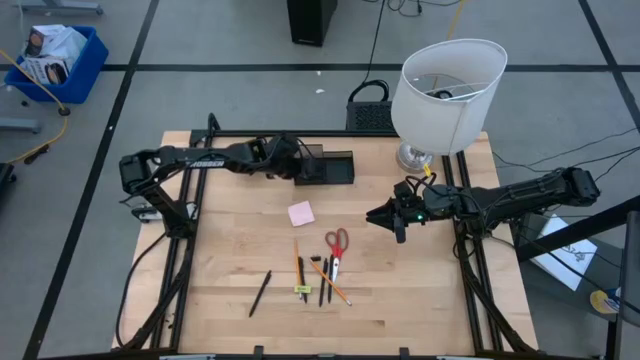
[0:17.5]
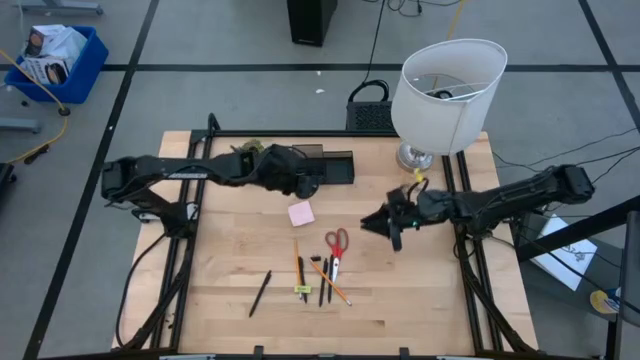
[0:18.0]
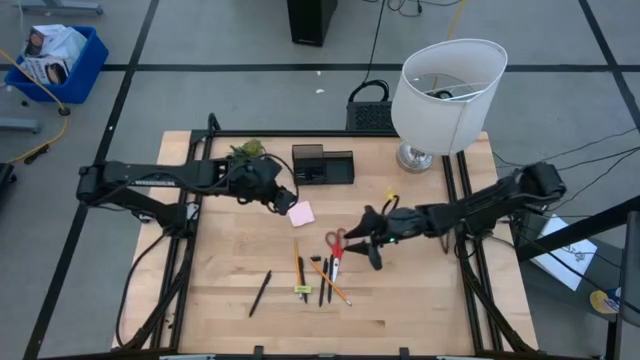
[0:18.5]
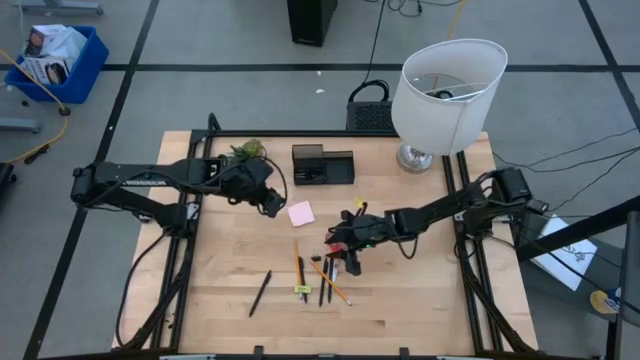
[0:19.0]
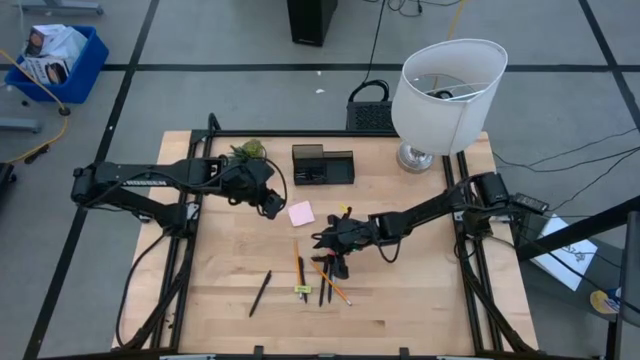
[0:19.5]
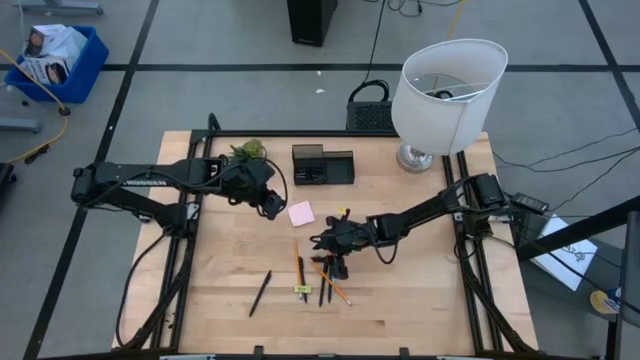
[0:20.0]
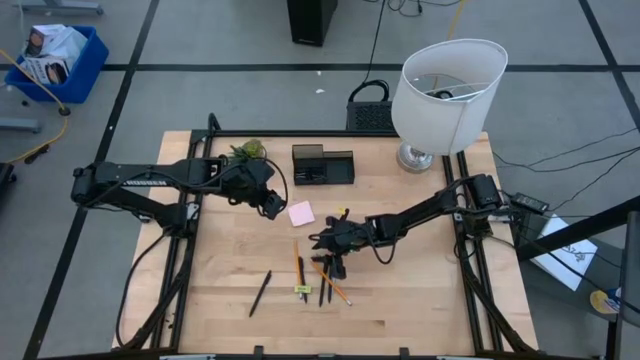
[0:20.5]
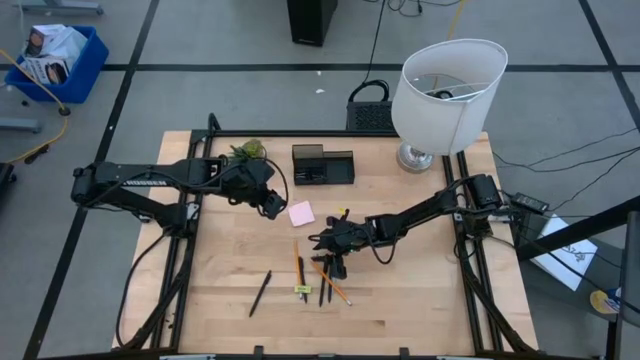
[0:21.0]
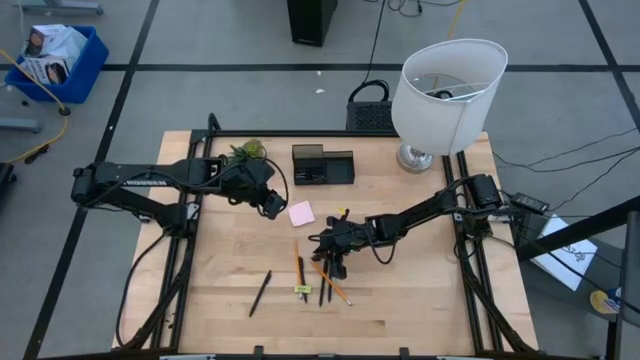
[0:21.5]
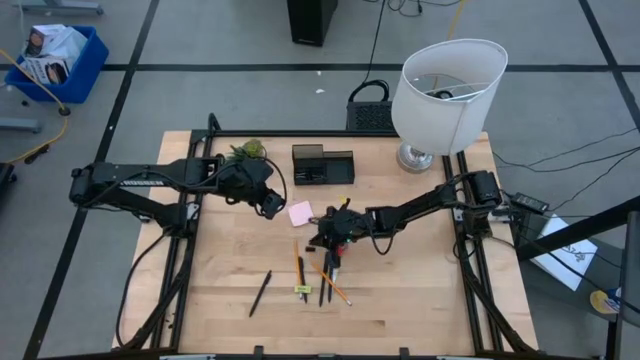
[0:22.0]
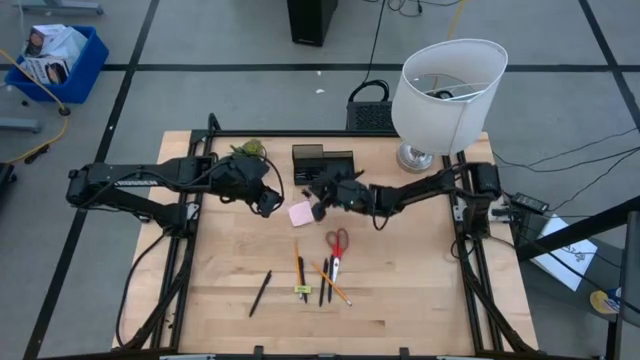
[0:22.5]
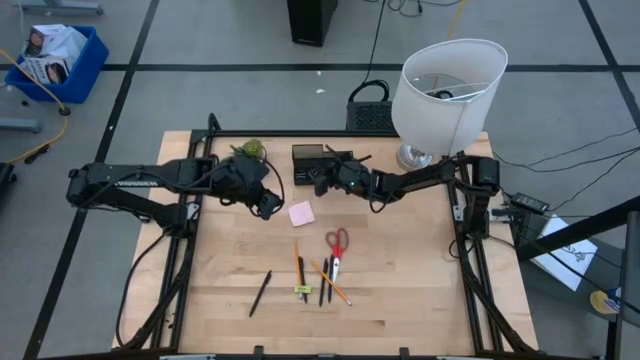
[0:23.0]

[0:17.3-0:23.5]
Task: Pick and place office supplies into organizer
Put the black binder clip into the black desk organizer

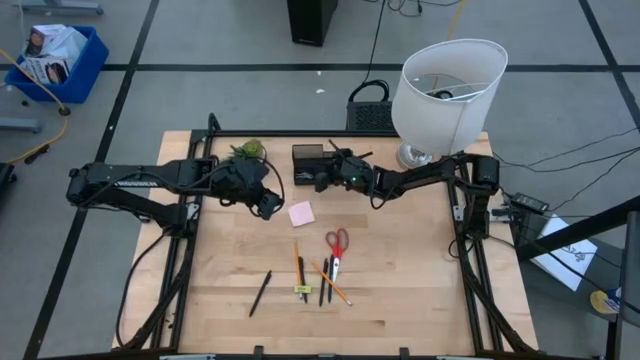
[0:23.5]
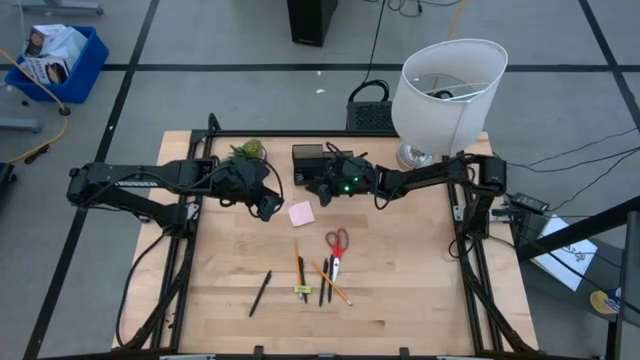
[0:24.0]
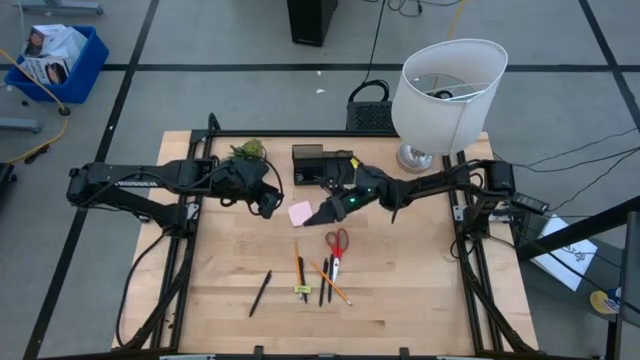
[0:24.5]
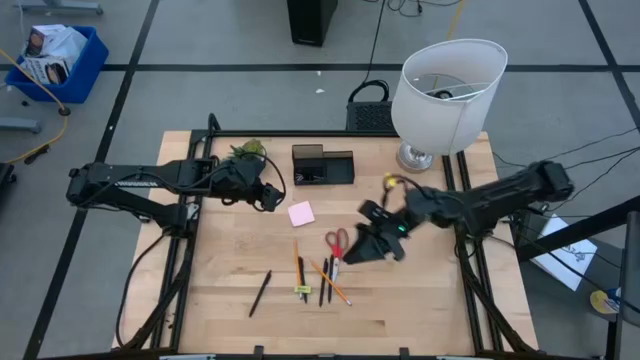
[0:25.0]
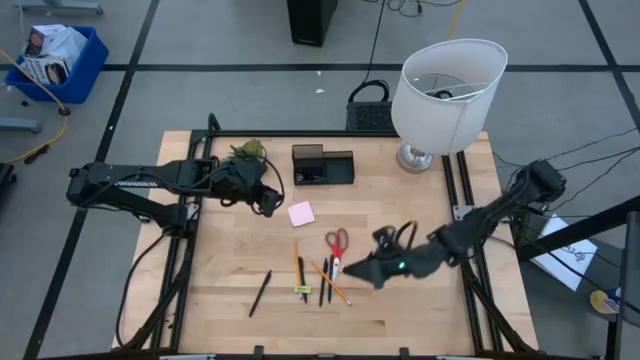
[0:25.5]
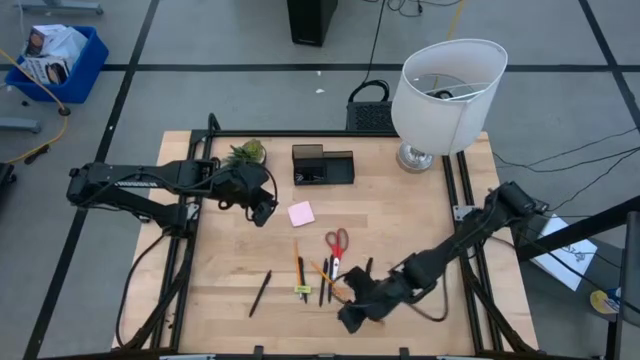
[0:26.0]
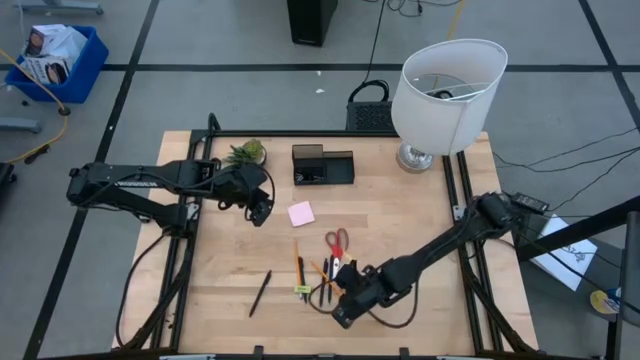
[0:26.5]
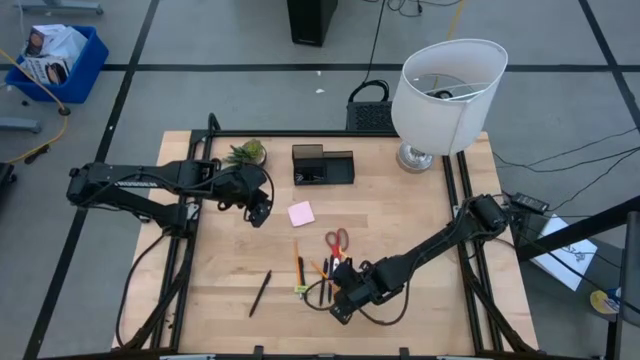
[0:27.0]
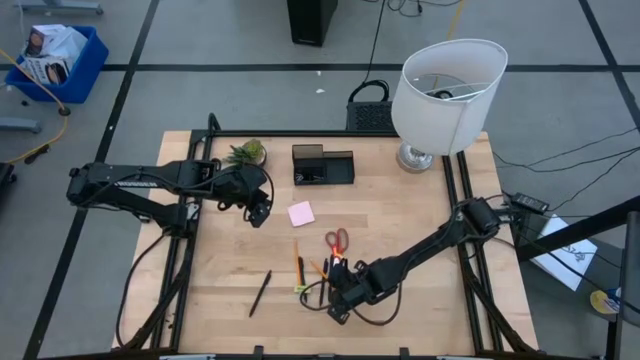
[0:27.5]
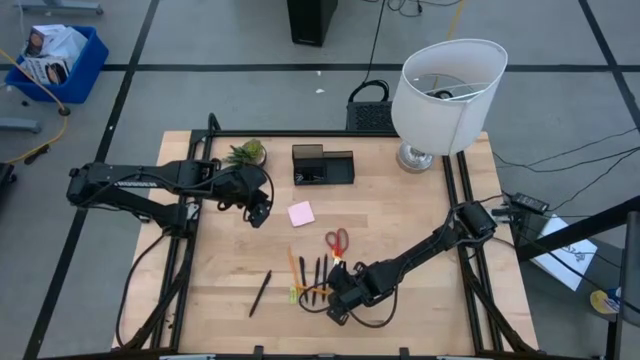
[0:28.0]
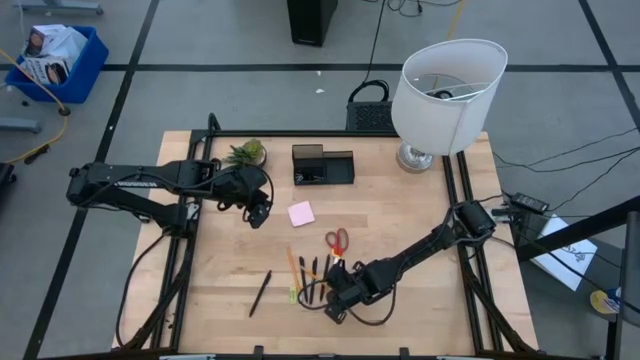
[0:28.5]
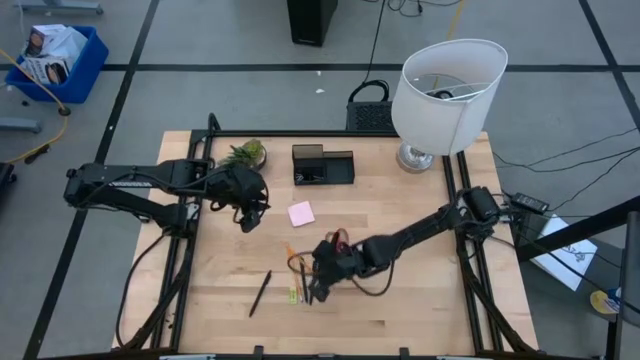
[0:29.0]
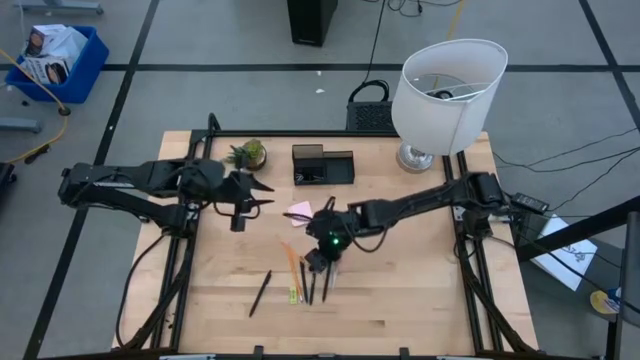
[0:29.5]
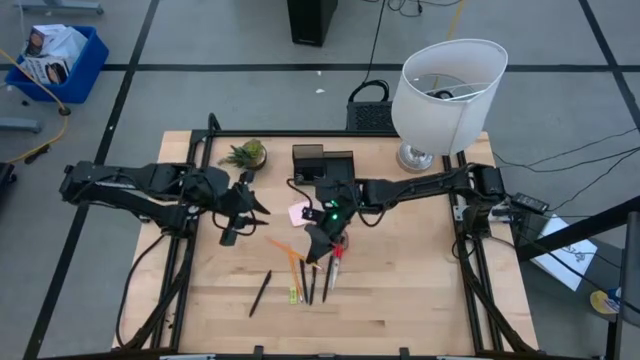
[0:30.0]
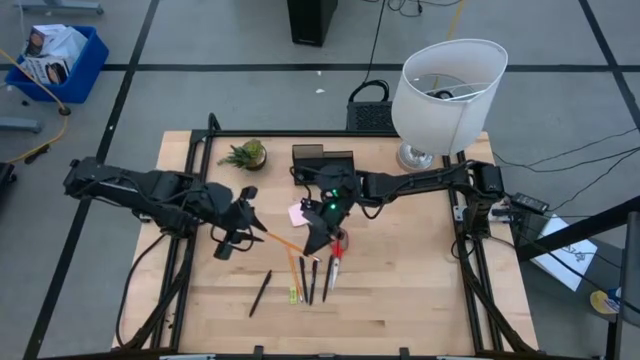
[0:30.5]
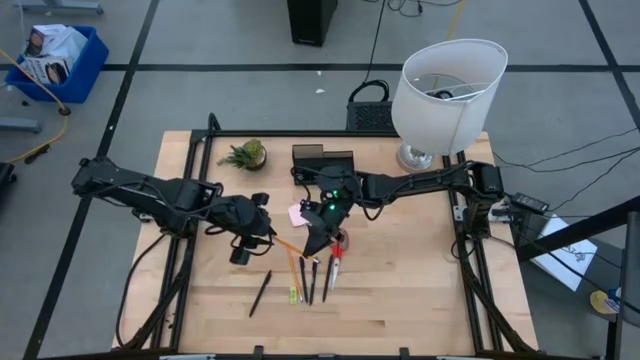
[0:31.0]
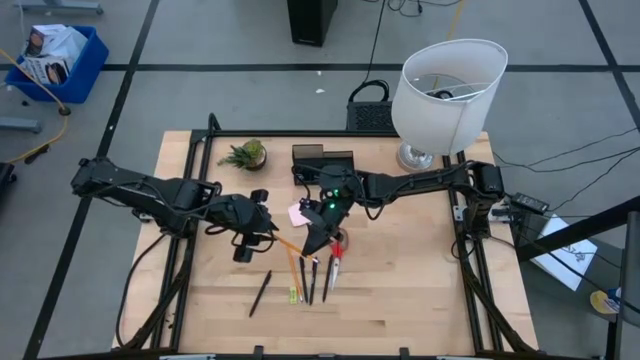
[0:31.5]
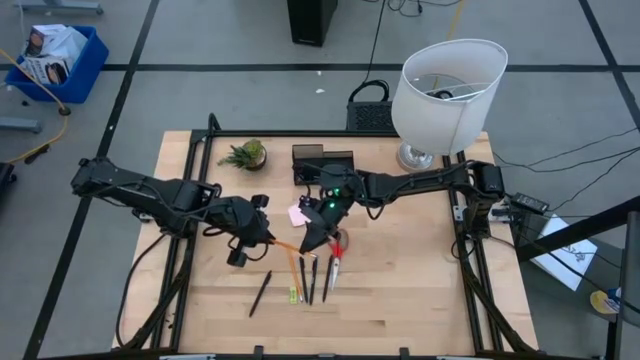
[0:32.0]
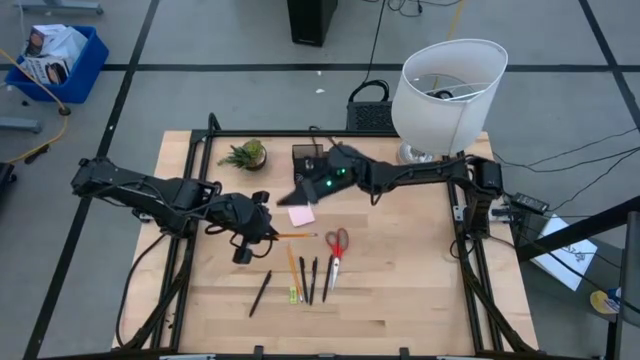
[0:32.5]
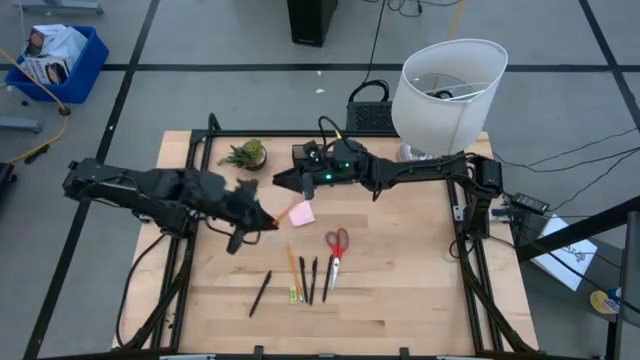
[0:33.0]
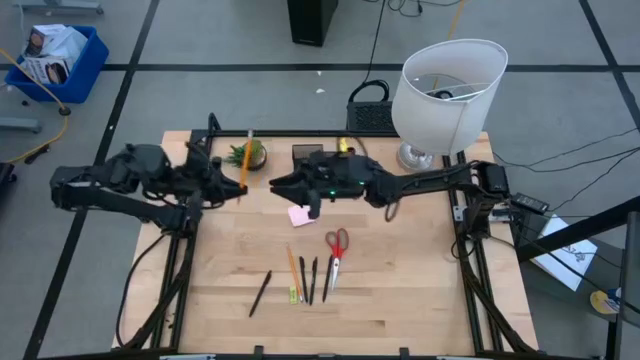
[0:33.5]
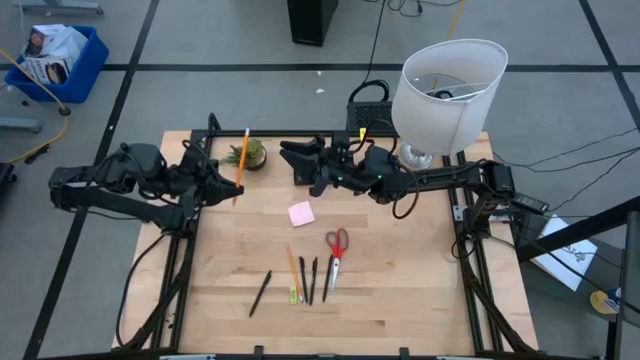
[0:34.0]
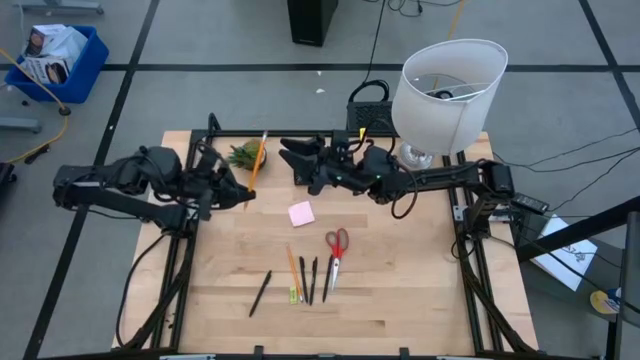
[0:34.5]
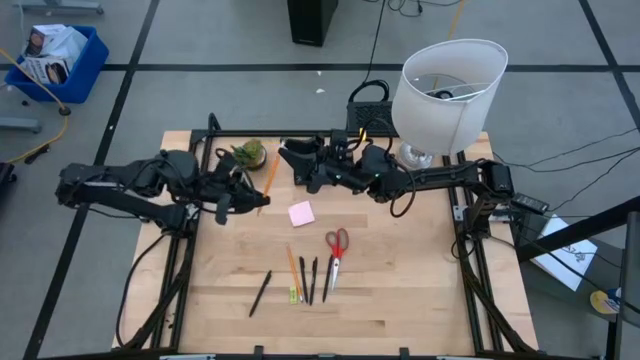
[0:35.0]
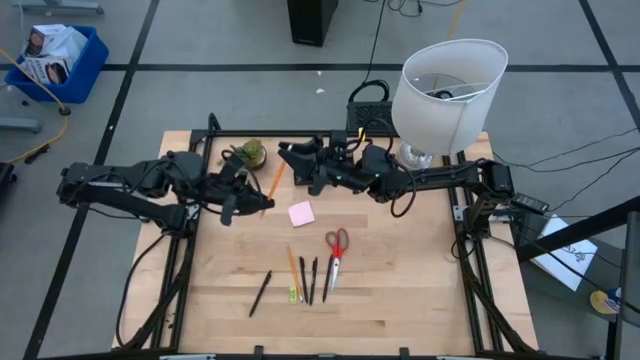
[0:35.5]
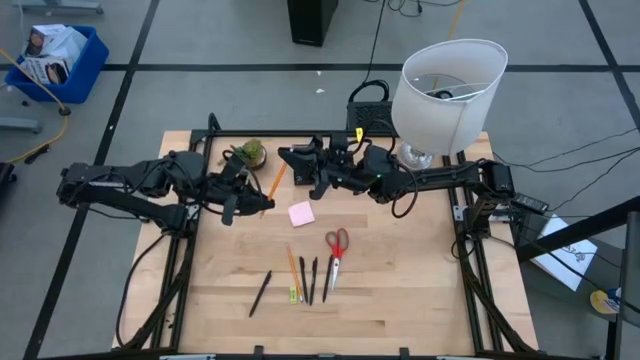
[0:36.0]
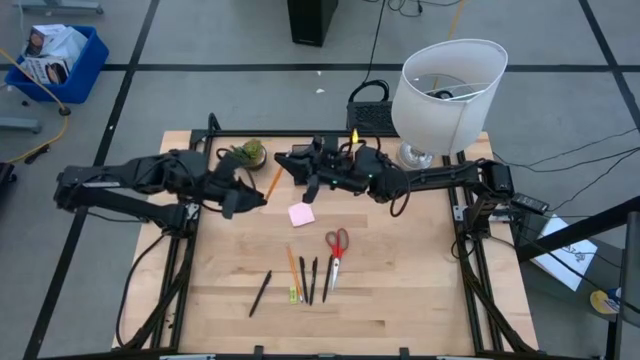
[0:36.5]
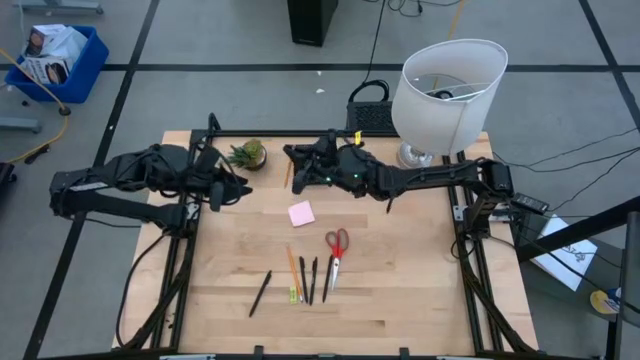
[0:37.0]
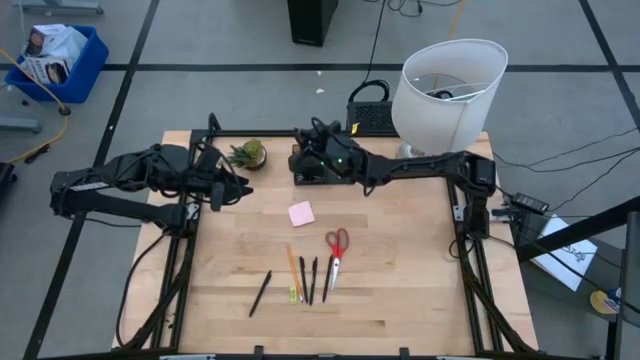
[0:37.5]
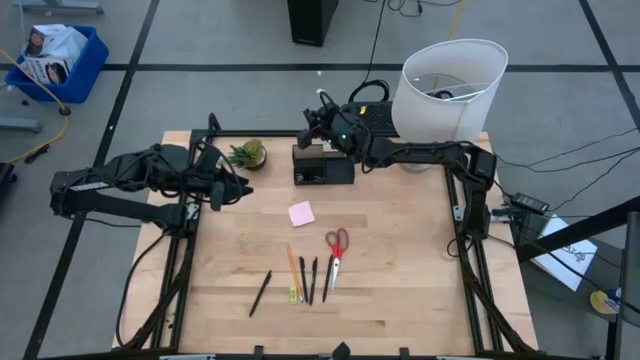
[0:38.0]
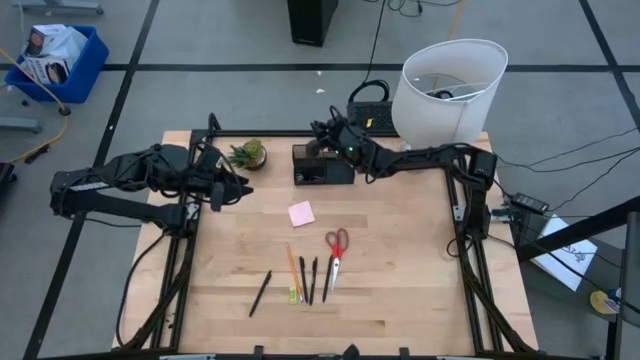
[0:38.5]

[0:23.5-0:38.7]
Put the orange pencil into the black desk organizer
